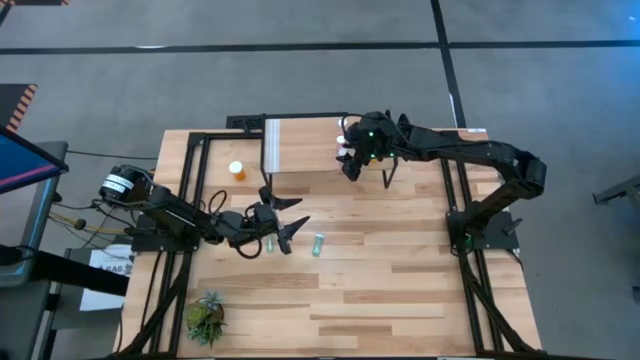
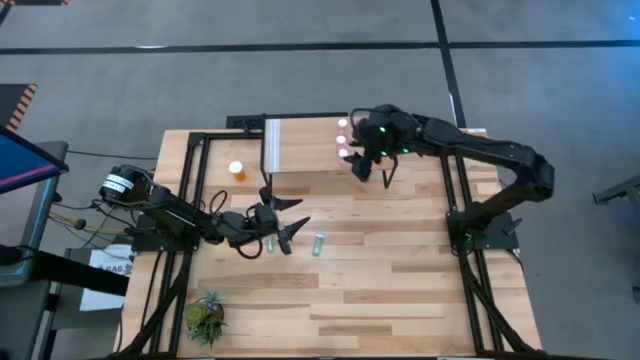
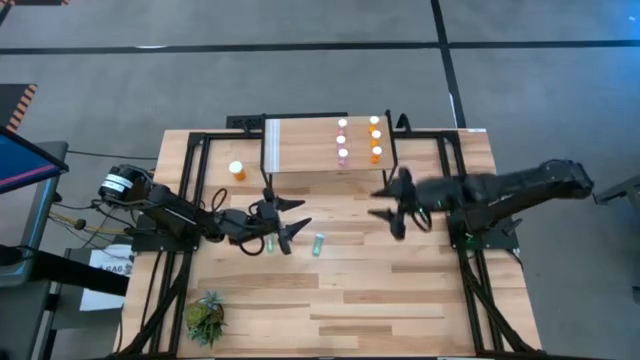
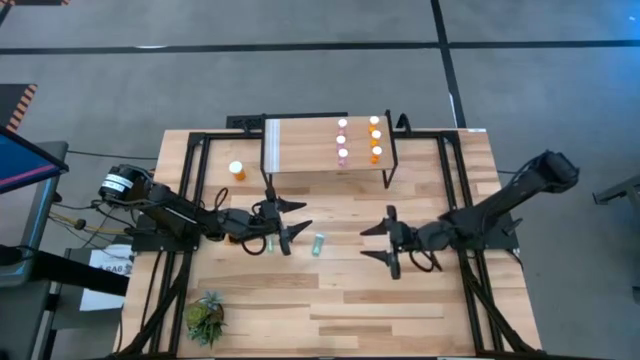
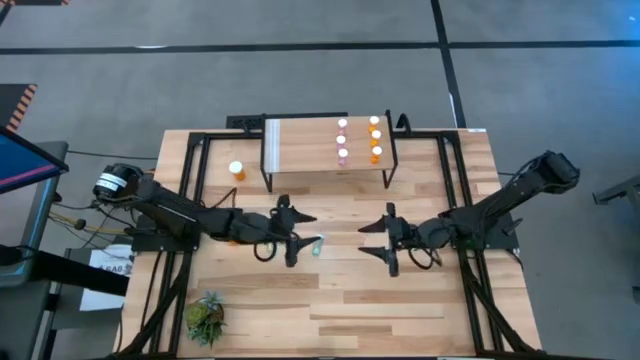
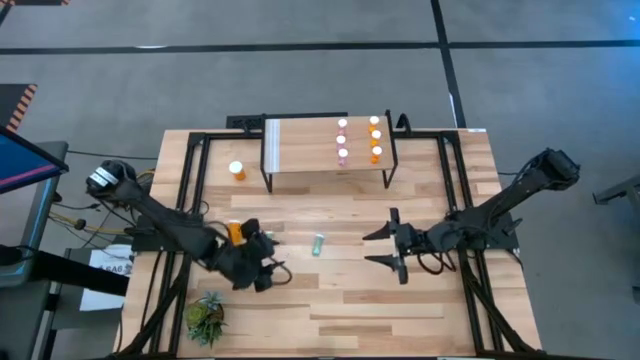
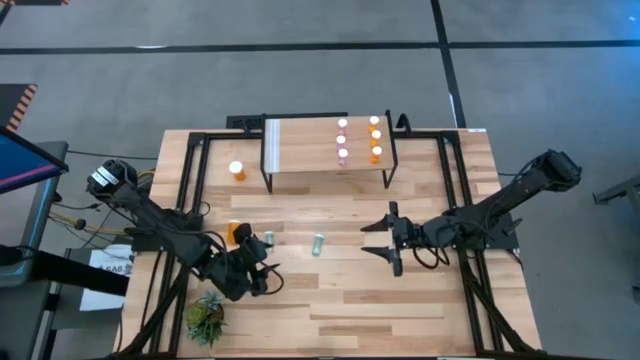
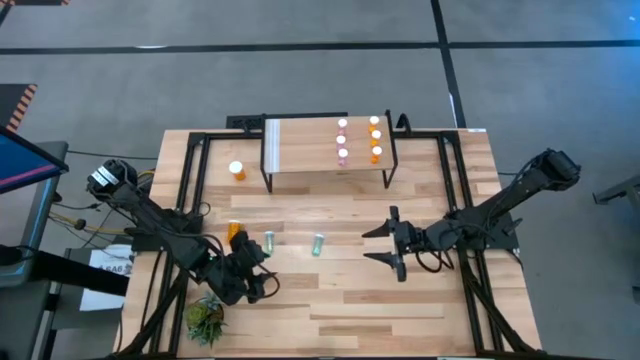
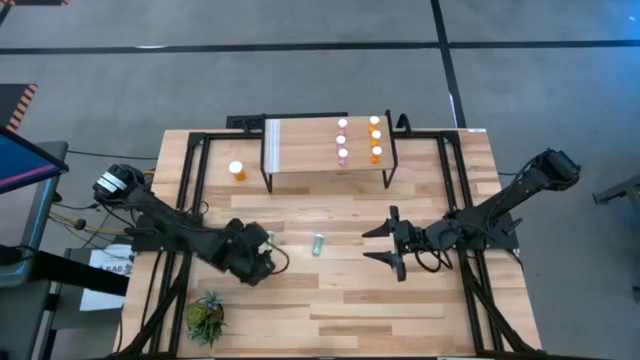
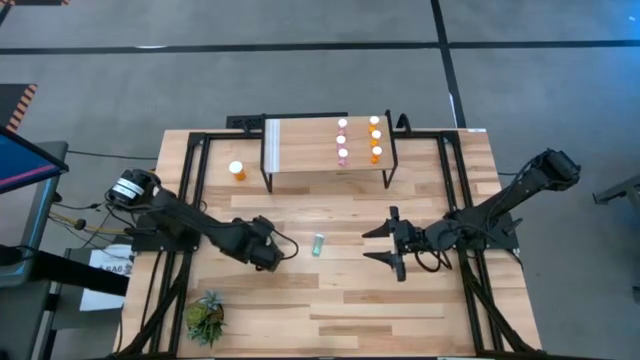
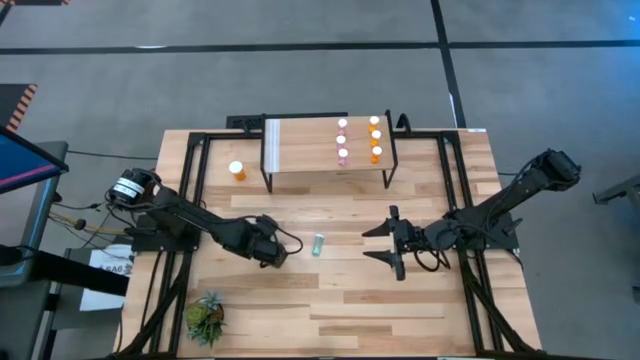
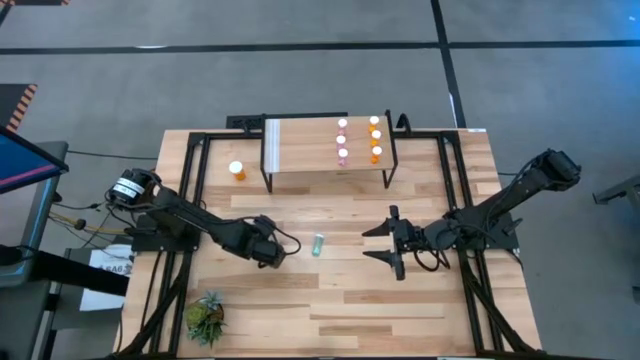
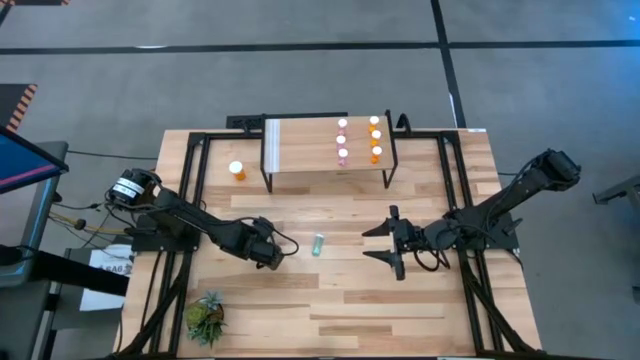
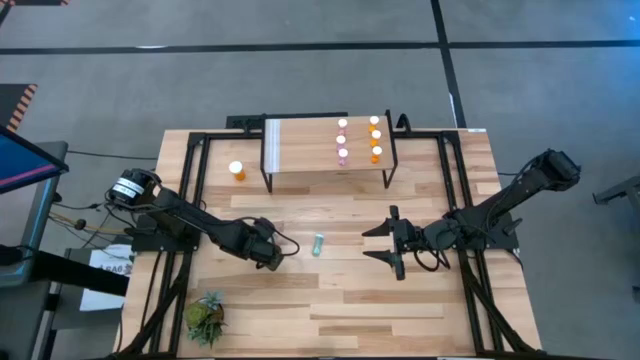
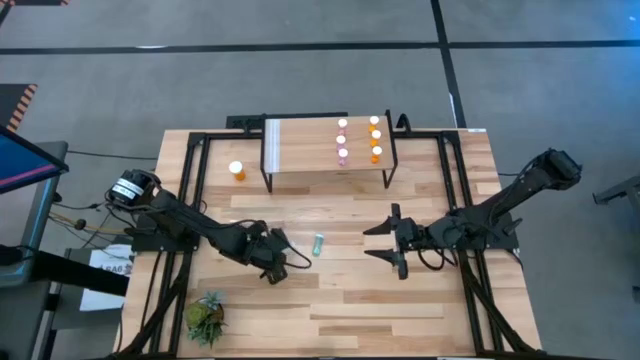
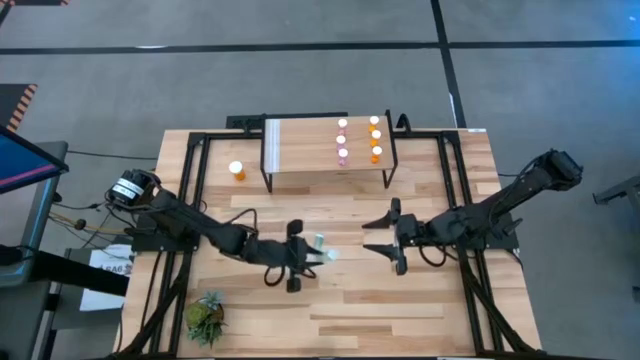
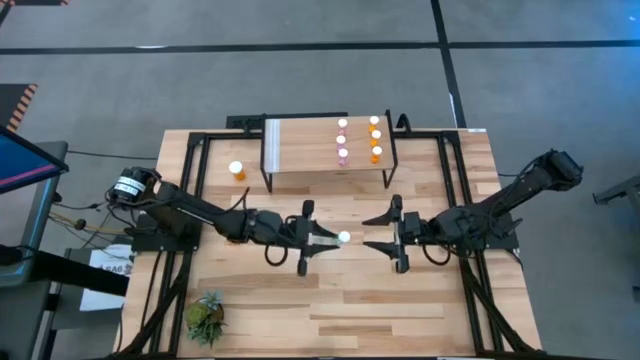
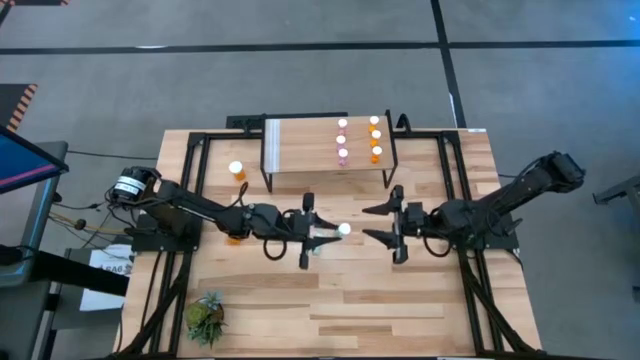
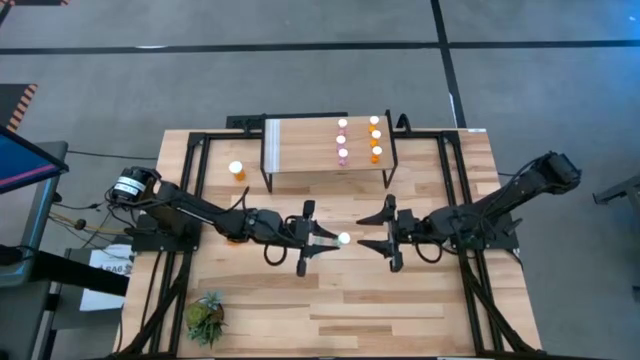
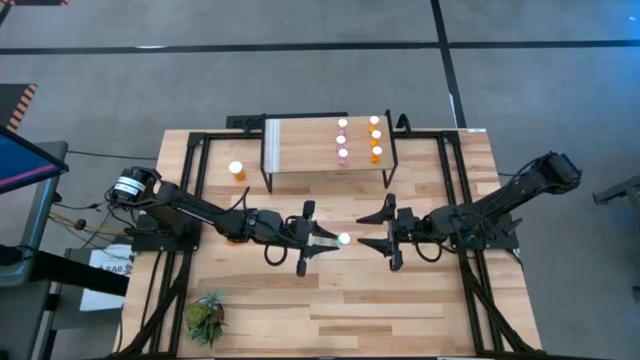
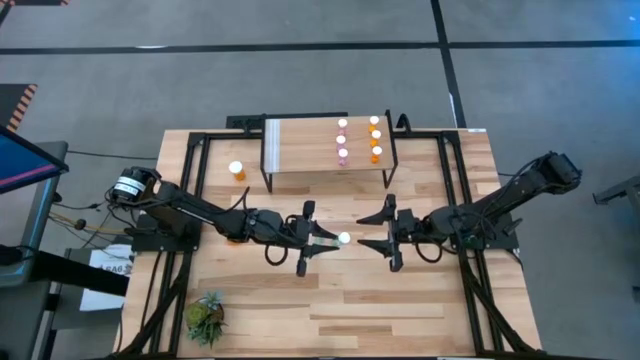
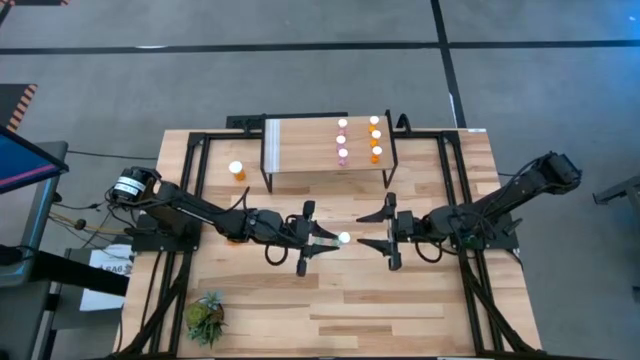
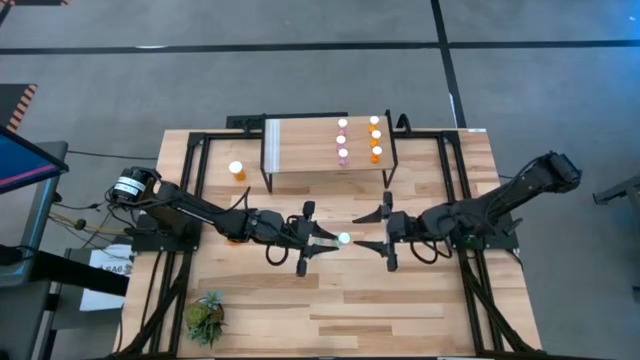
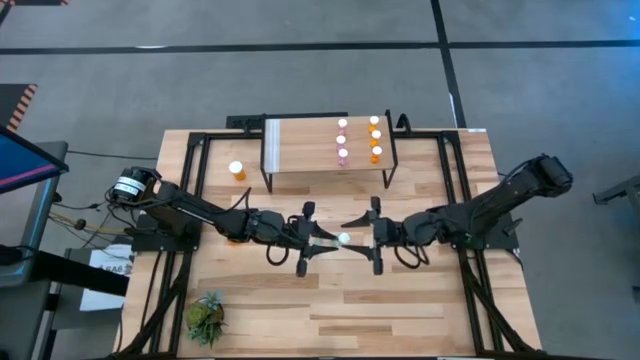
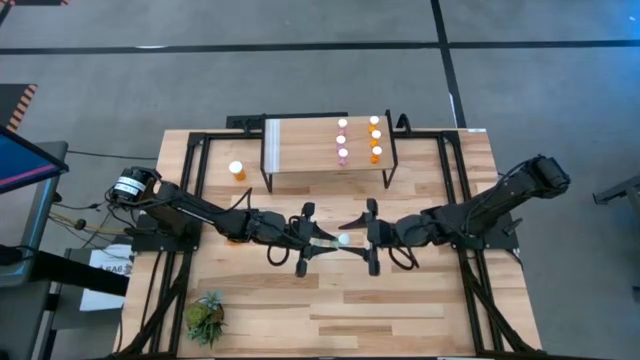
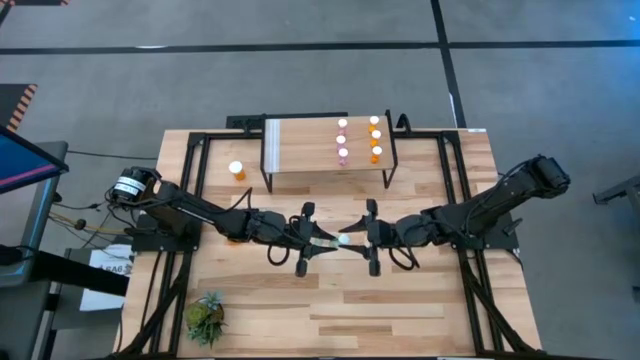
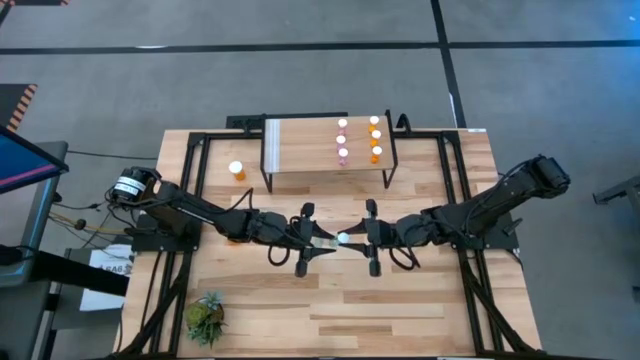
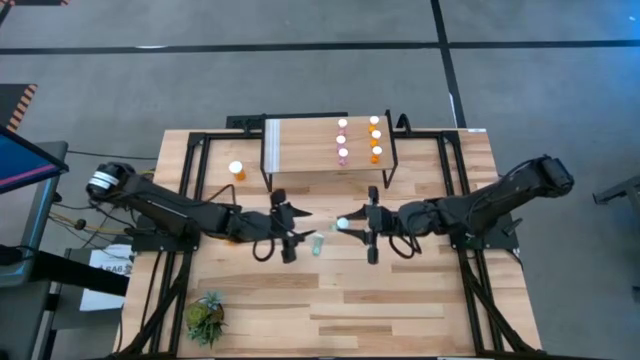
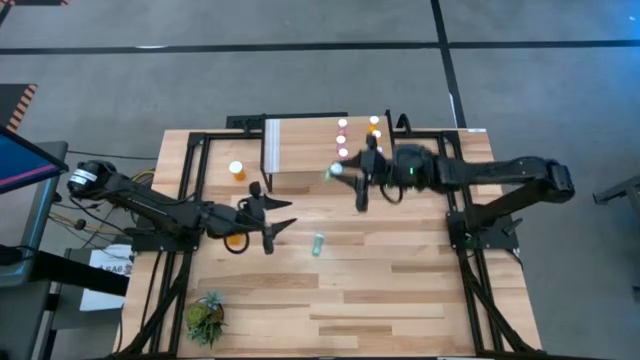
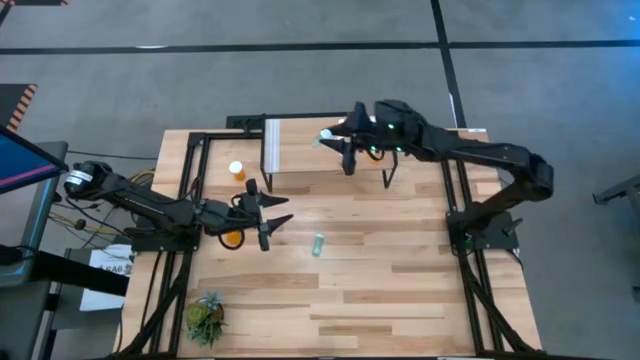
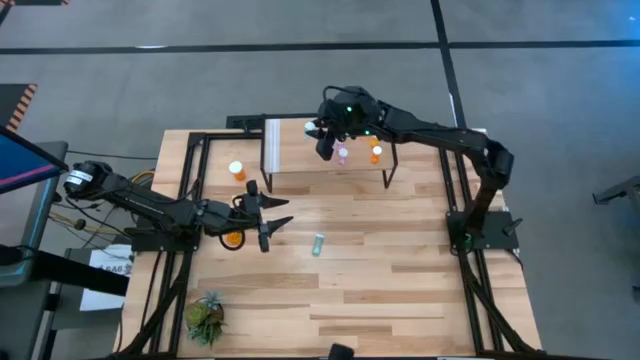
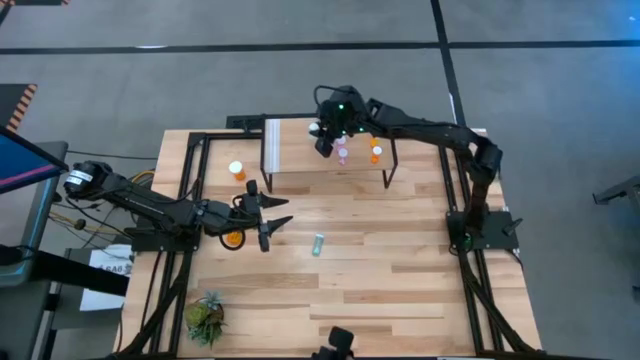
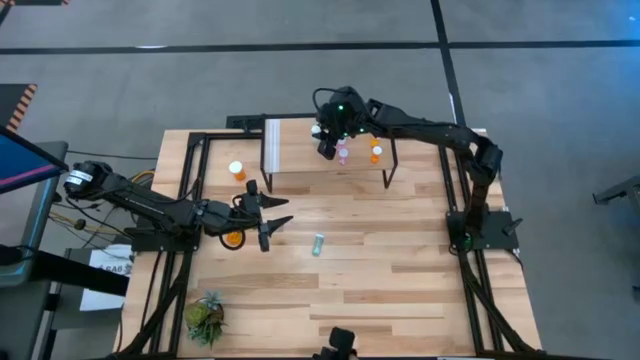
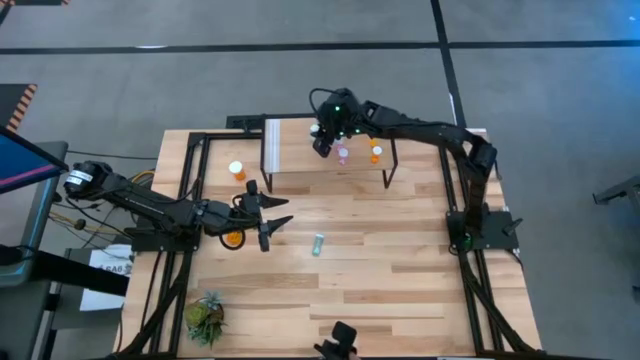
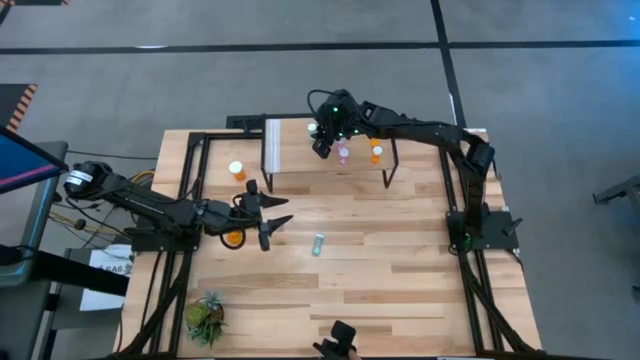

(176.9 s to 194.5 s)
Task: Pick and place medicine bottles onto shelf by color
Put the left blue pill bottle on the shelf

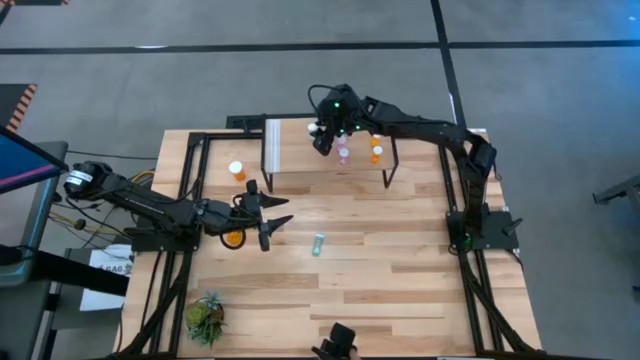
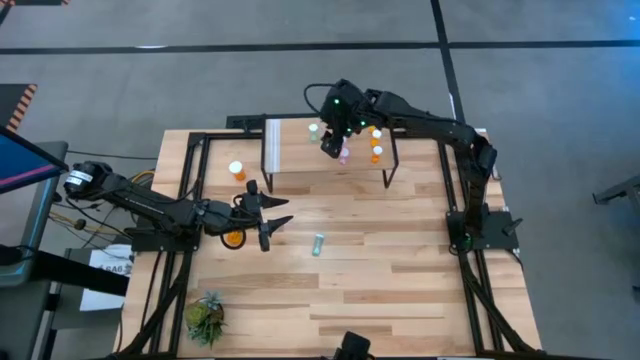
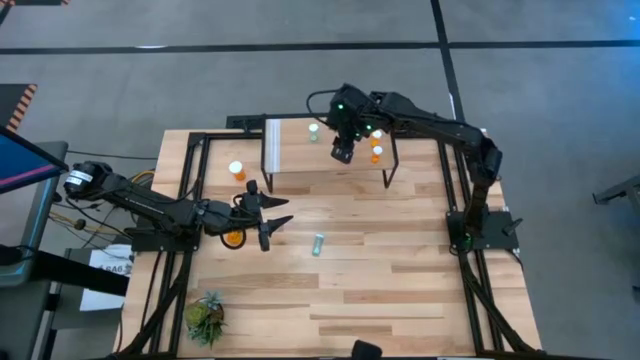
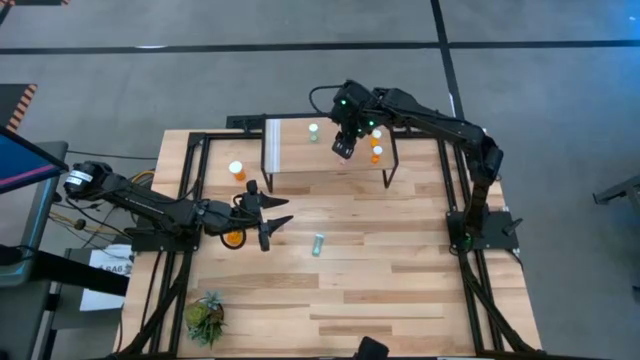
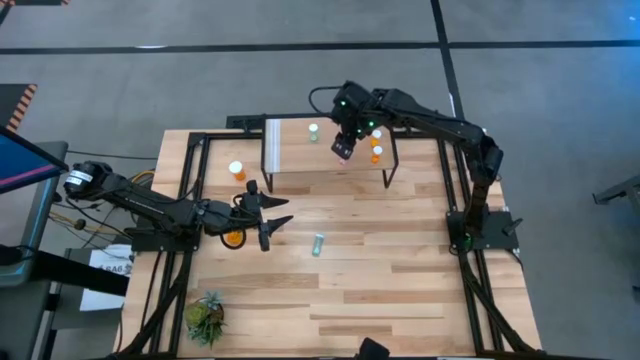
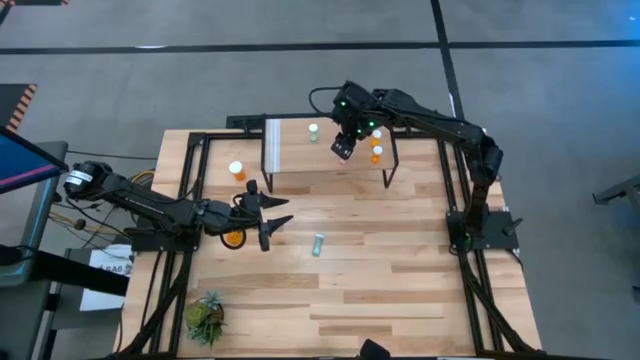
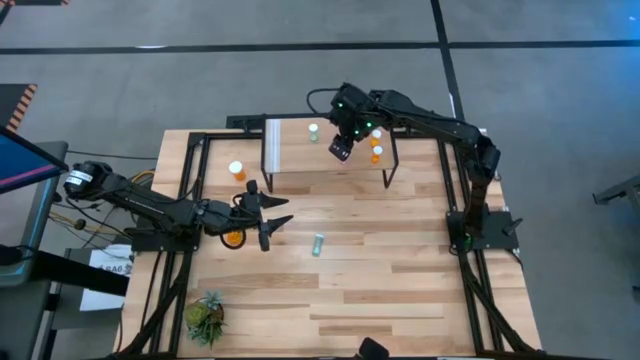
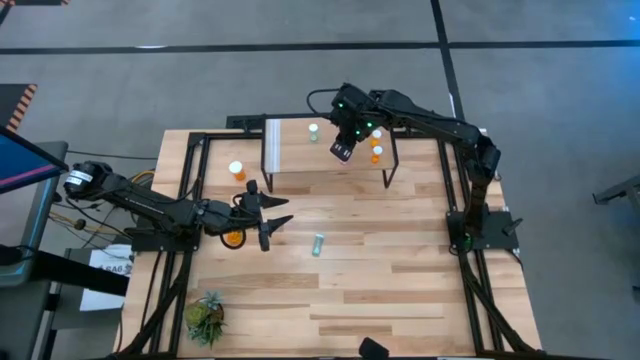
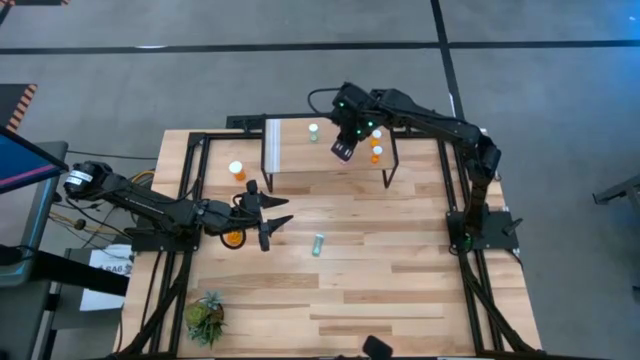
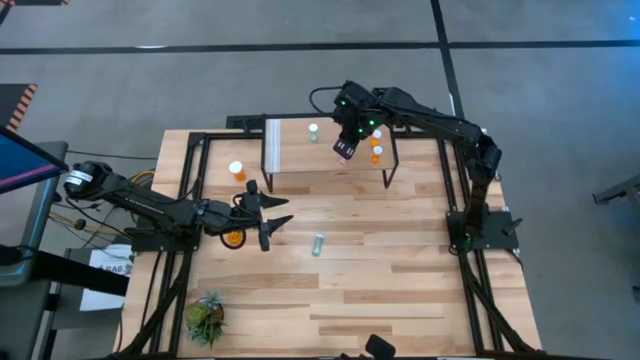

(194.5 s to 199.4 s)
Adjust the middle pink pill bottle
